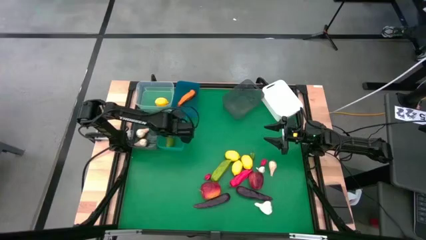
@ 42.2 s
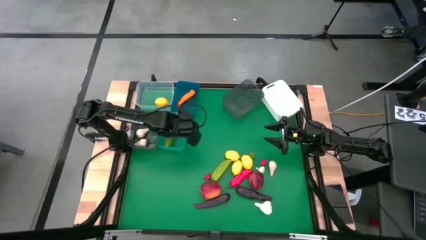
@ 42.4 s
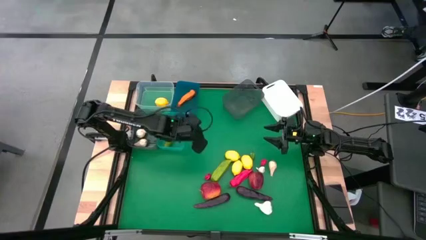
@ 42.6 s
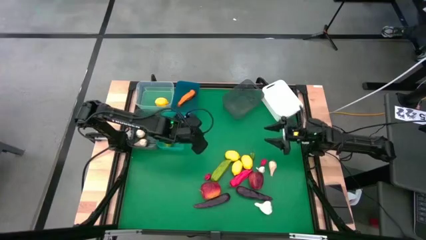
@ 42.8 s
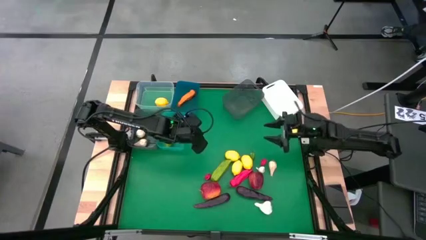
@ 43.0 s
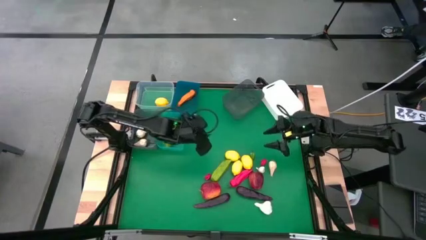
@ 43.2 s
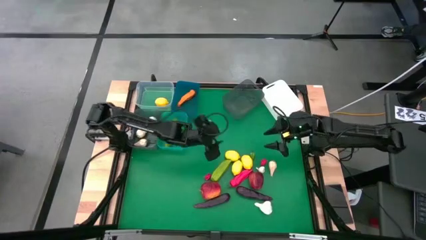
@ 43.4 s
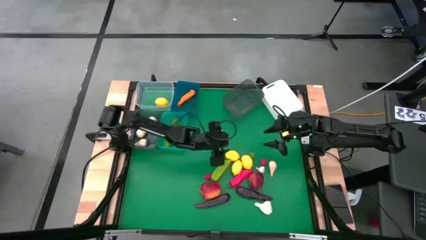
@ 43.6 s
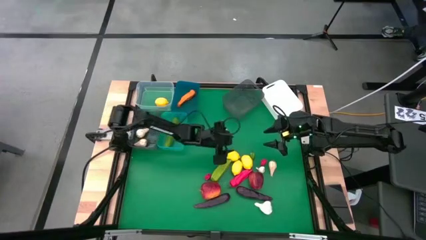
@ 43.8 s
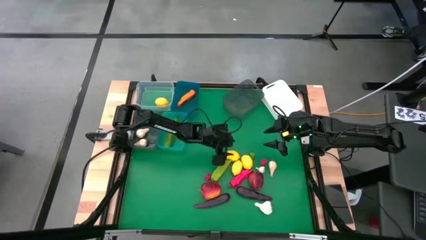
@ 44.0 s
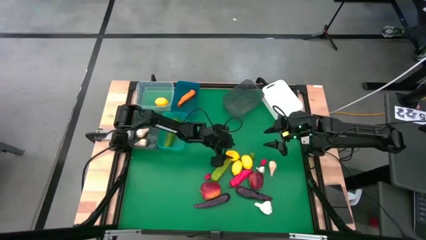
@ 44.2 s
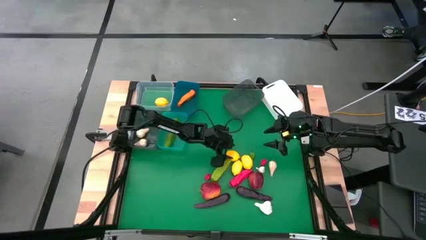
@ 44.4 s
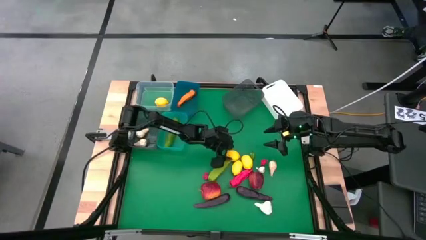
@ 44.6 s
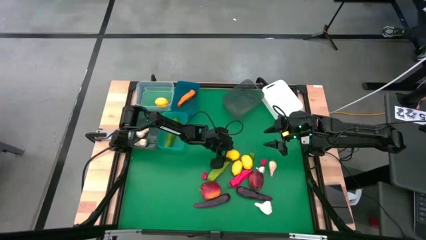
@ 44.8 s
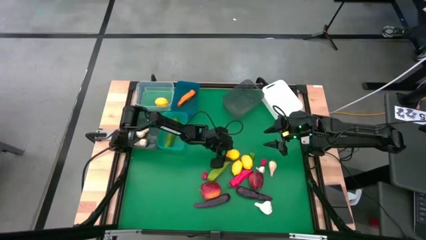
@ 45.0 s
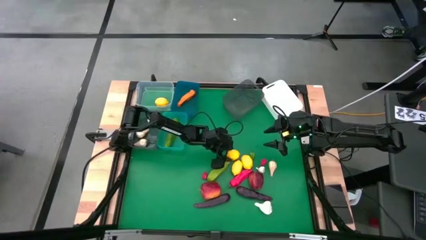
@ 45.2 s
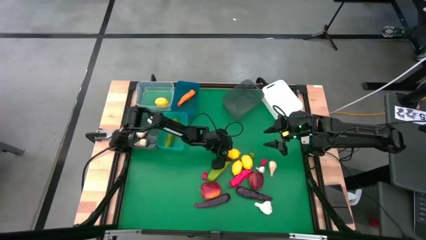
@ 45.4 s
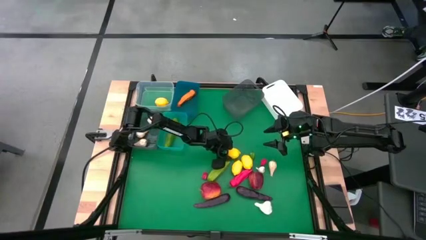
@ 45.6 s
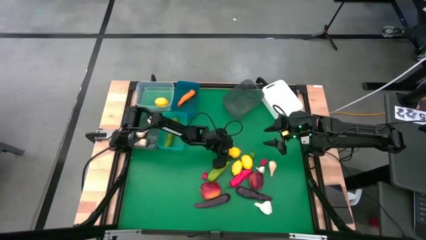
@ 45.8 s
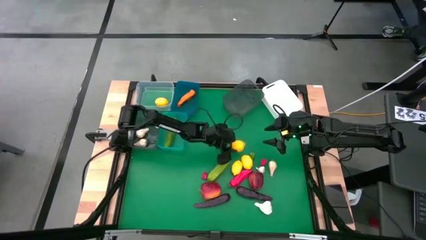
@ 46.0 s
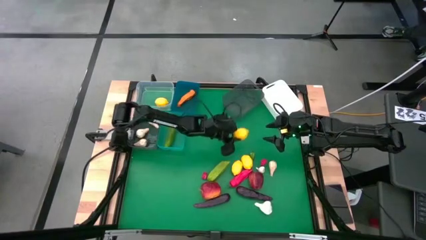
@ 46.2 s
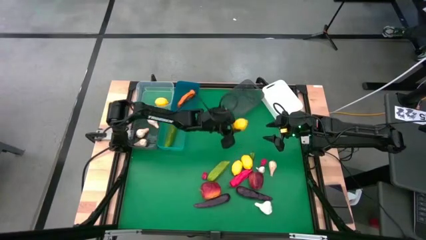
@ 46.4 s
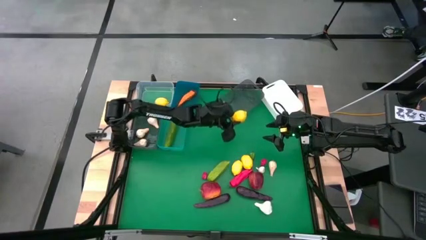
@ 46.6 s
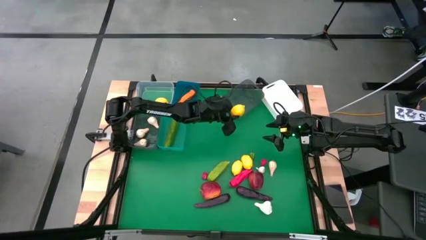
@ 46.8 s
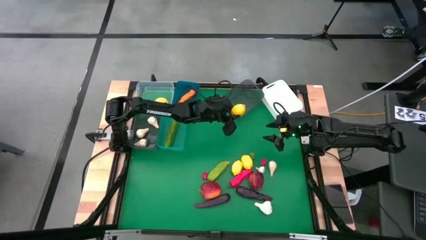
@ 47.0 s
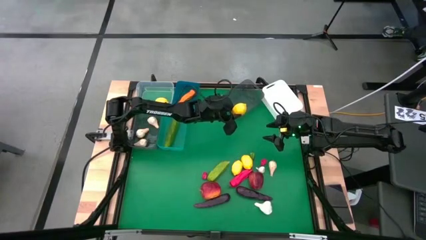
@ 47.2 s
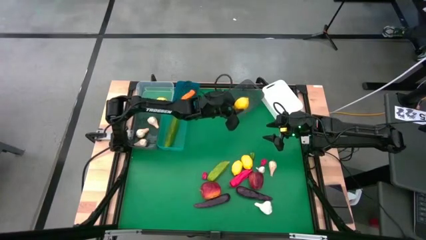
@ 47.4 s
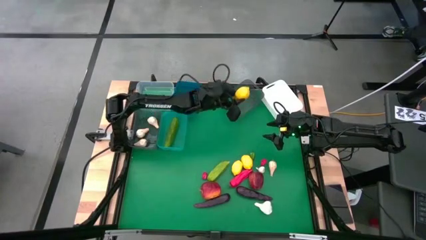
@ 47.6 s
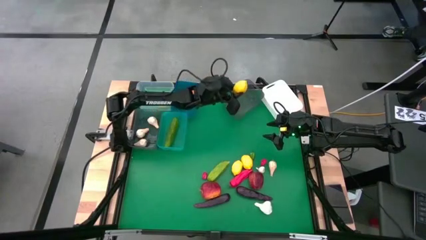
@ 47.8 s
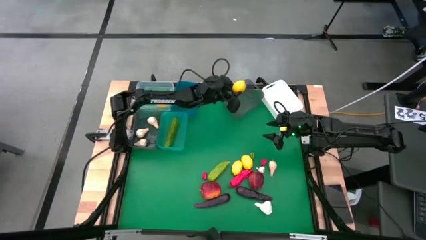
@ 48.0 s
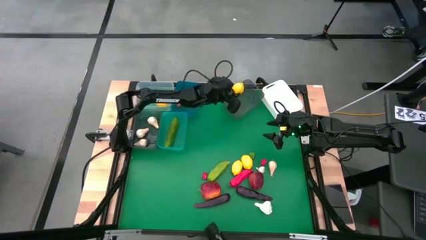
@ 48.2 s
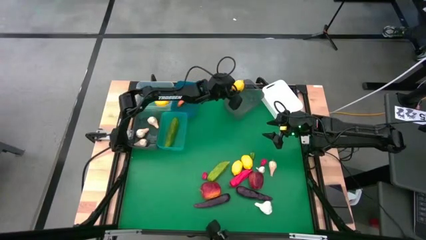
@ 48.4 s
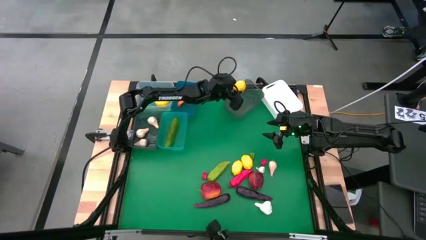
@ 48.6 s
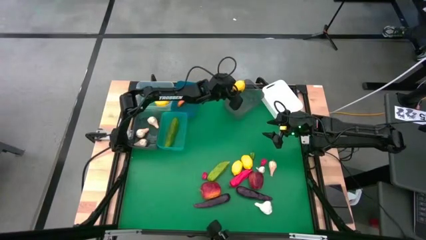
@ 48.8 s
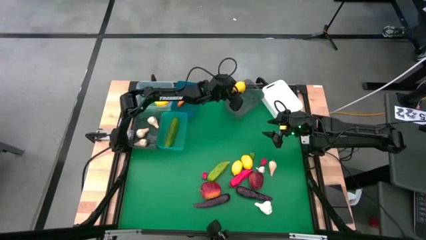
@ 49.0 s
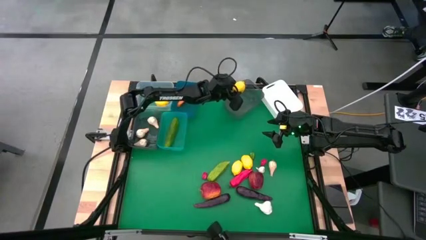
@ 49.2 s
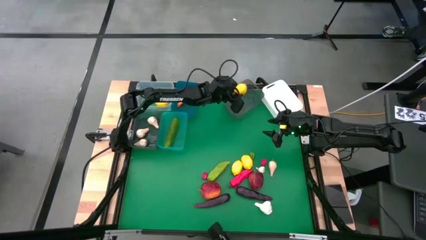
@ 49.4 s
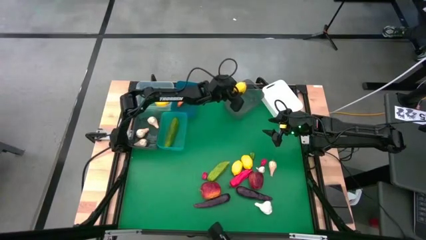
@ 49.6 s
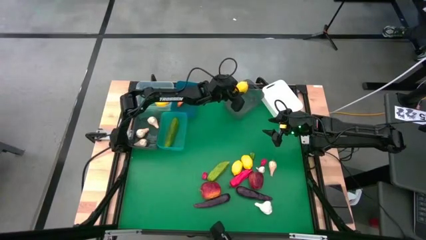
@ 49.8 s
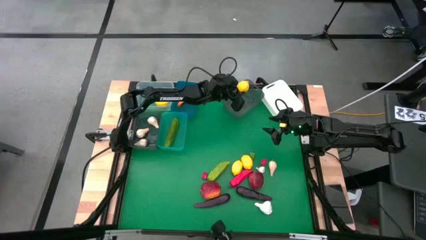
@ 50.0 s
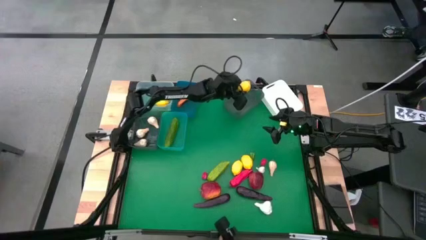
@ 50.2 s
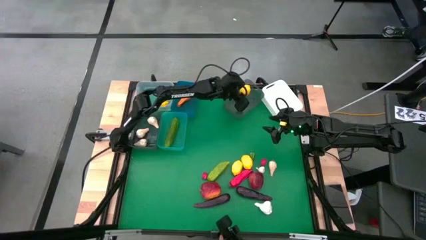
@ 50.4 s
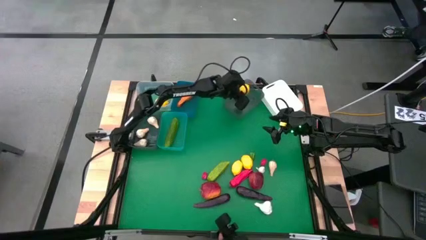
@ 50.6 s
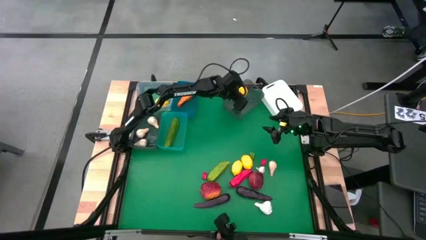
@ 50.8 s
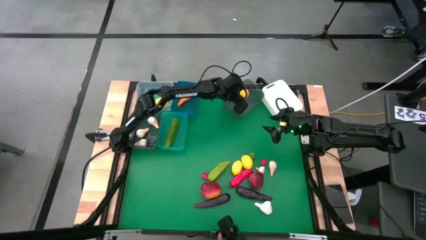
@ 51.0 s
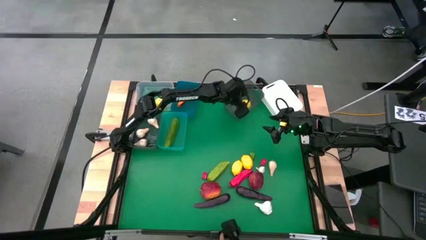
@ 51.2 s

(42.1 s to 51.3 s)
Task: Sort produce into baskets
Put the yellow lemon into the right black bin

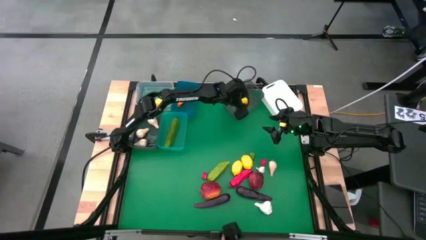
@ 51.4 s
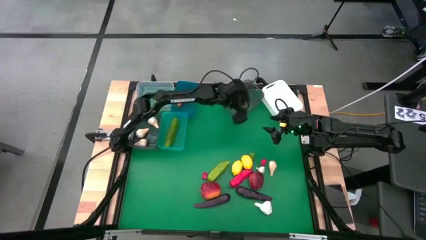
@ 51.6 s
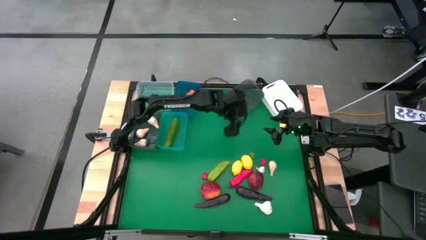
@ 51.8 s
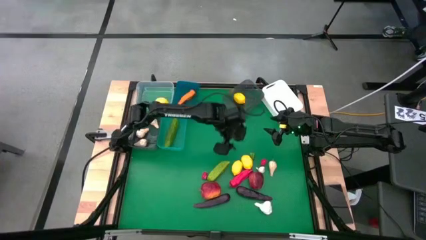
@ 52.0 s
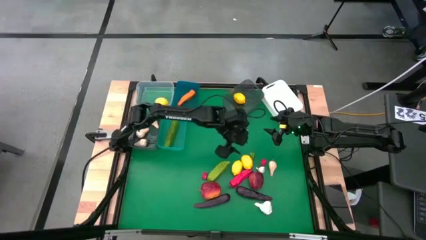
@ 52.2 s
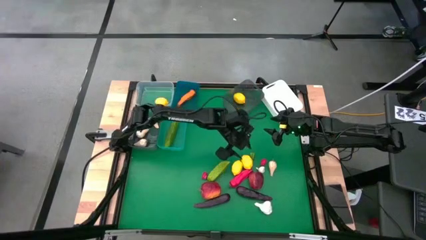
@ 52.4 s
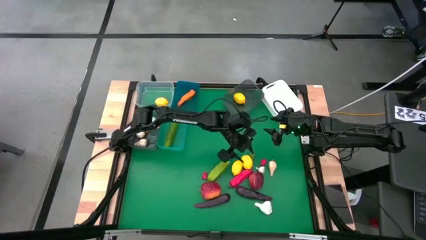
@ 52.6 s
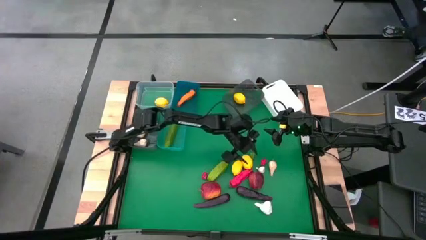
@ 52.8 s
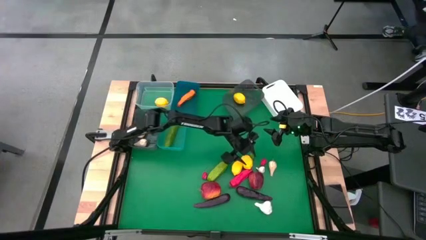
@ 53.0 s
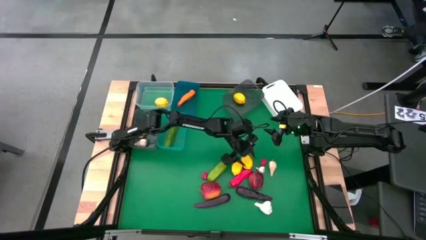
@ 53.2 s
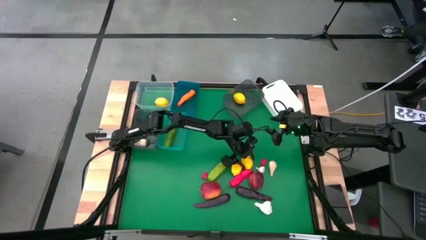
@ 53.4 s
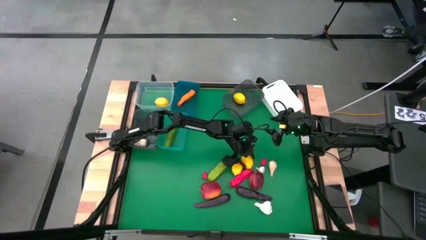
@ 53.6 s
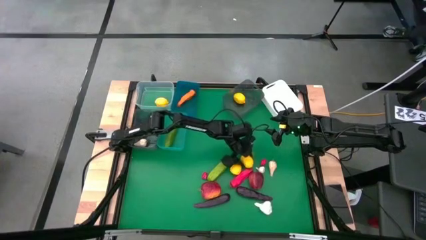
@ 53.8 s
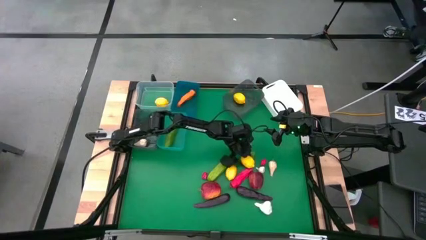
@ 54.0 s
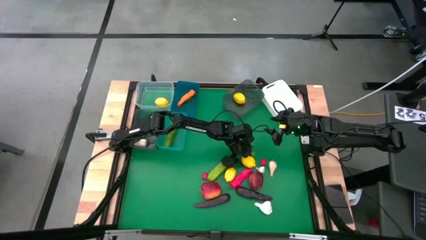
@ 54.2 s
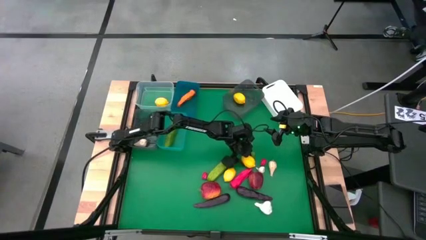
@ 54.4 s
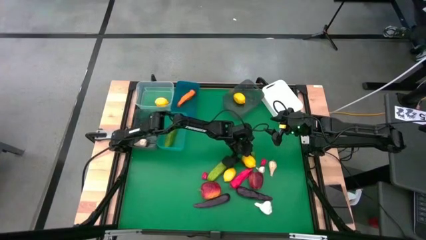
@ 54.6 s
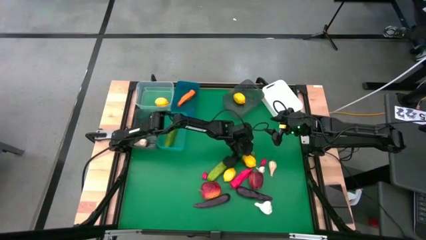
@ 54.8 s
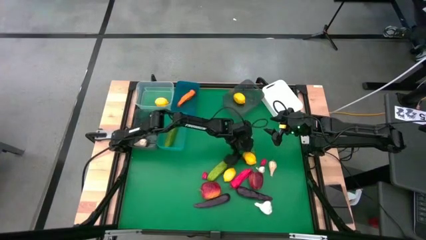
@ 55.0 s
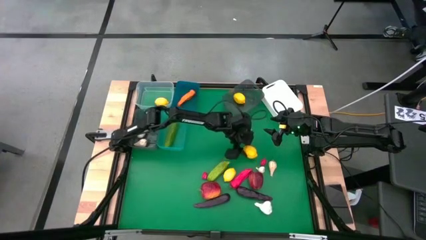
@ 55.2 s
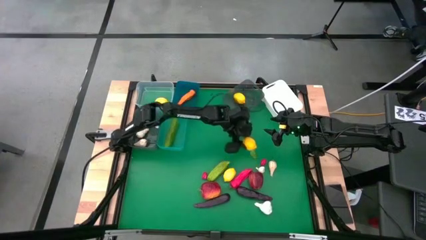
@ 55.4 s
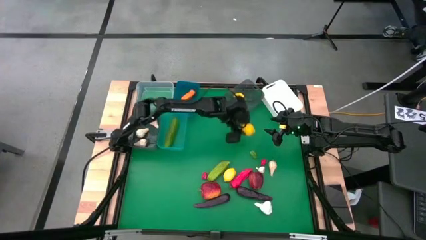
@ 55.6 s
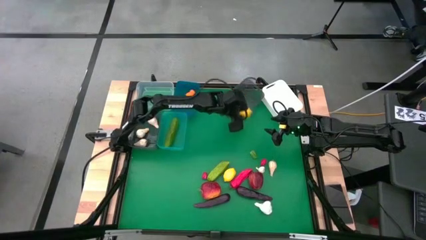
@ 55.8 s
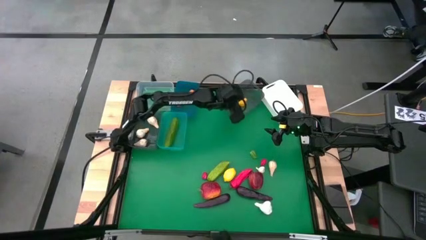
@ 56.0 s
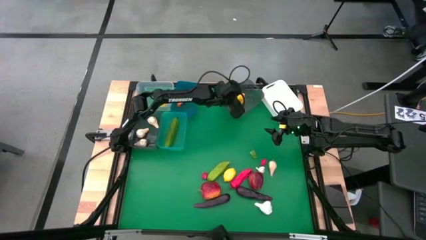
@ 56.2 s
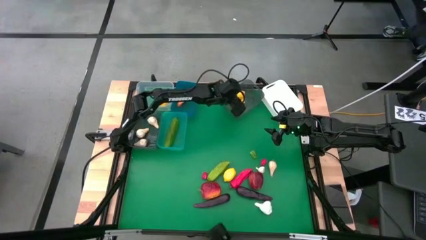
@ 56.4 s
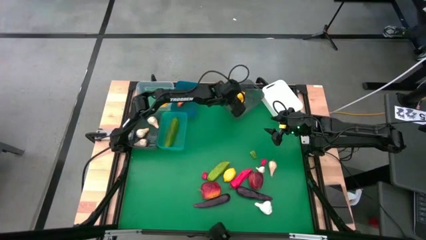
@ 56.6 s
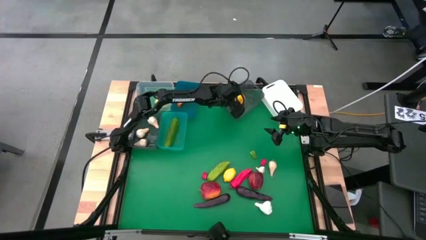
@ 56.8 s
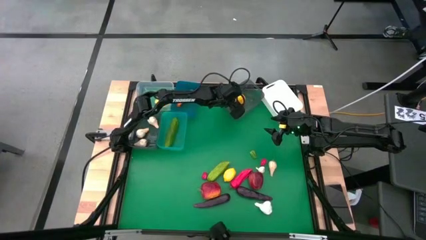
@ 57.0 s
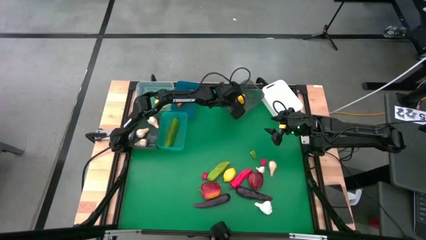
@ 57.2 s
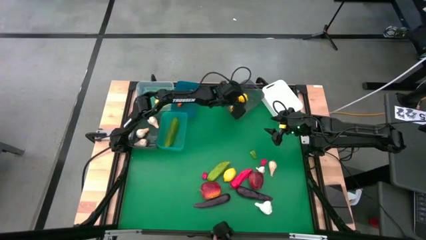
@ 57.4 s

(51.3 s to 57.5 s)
Put the yellow lemon into the right black bin
